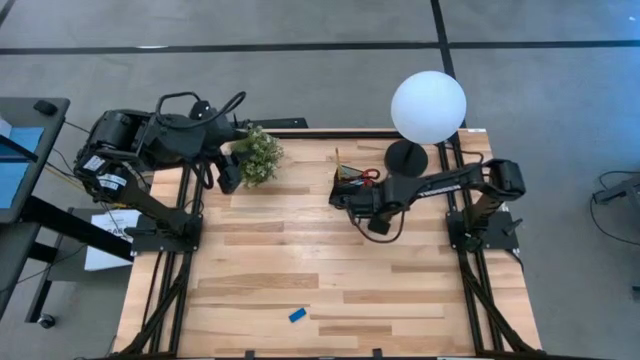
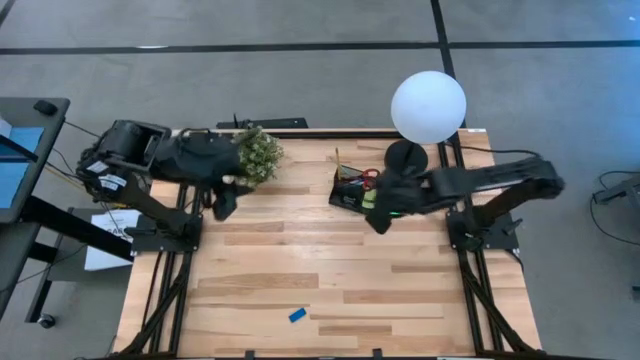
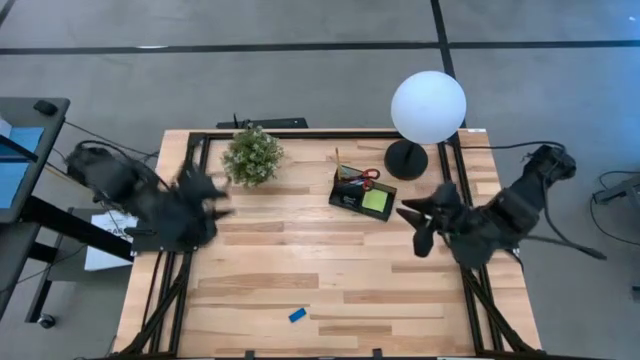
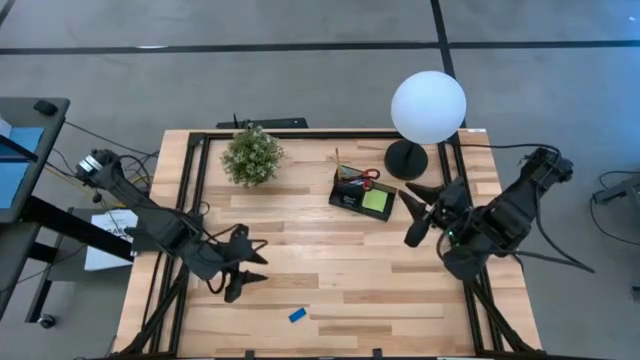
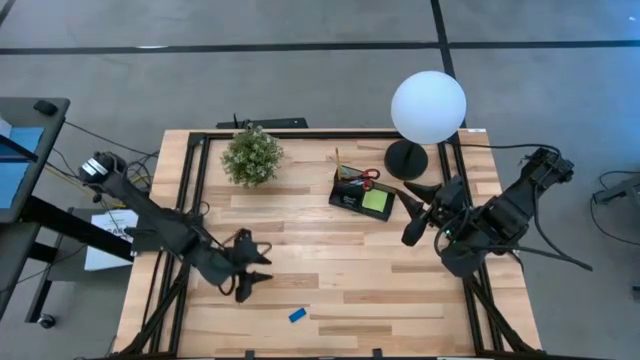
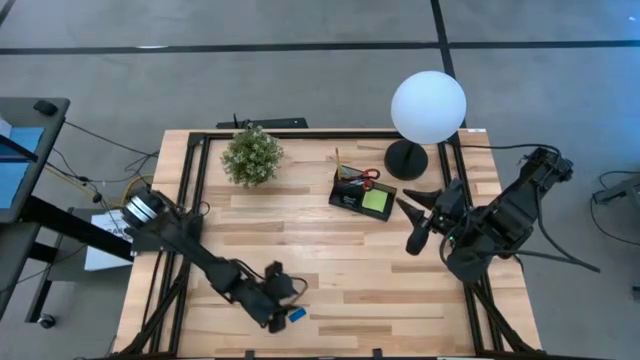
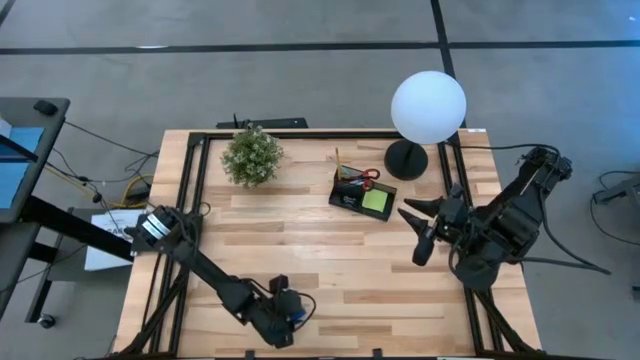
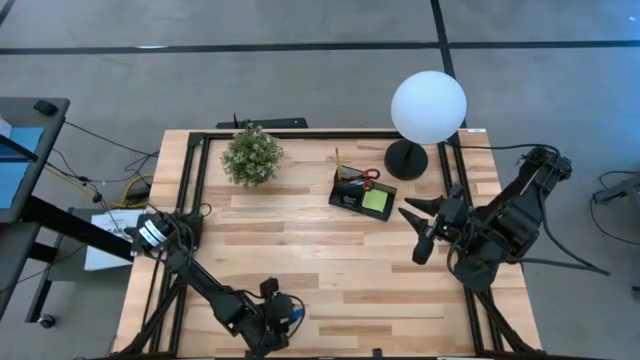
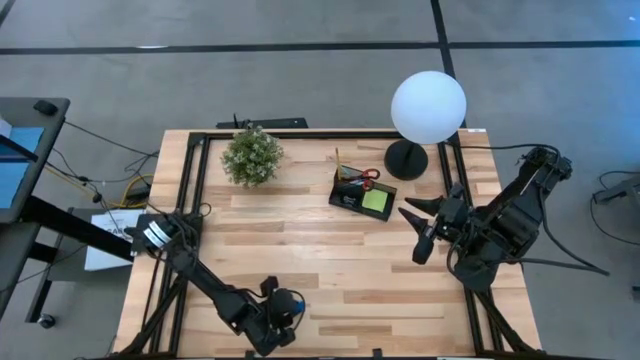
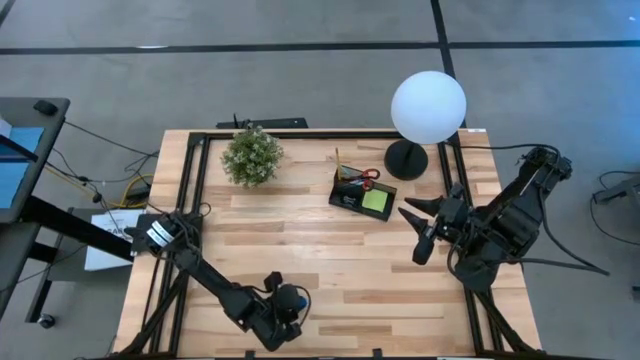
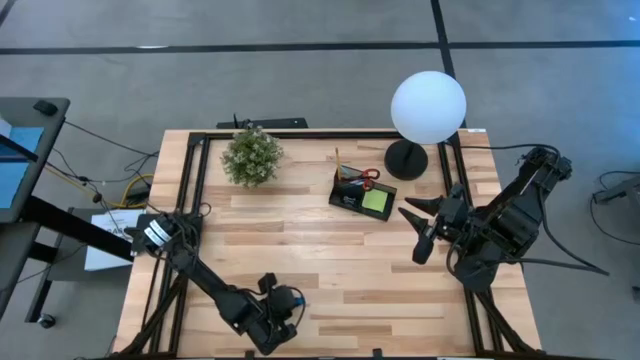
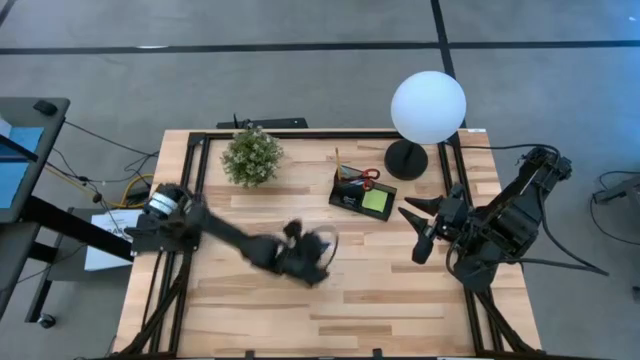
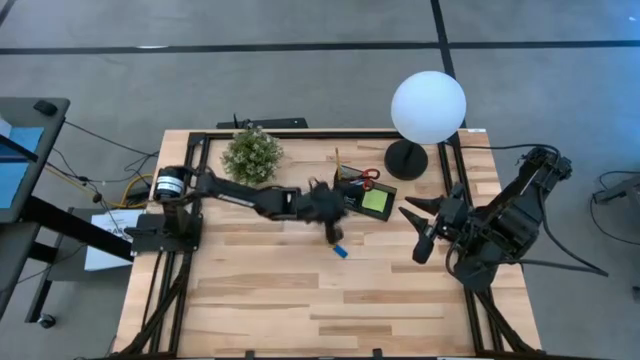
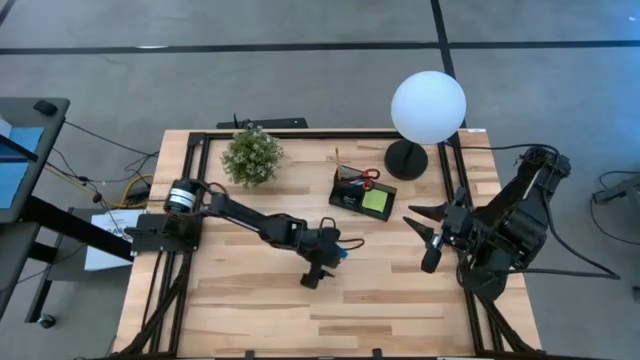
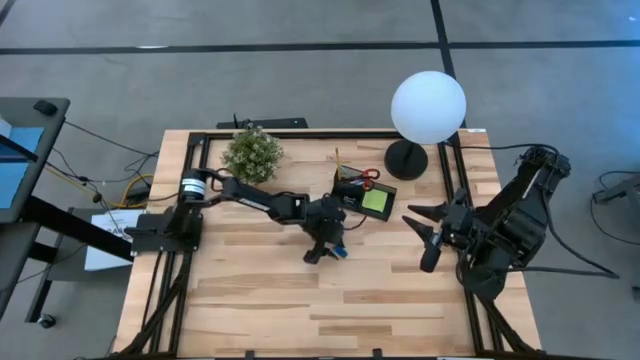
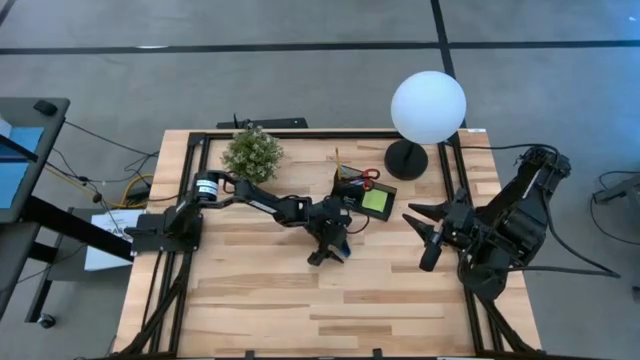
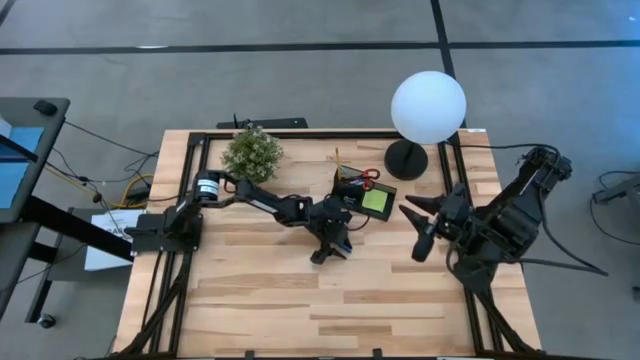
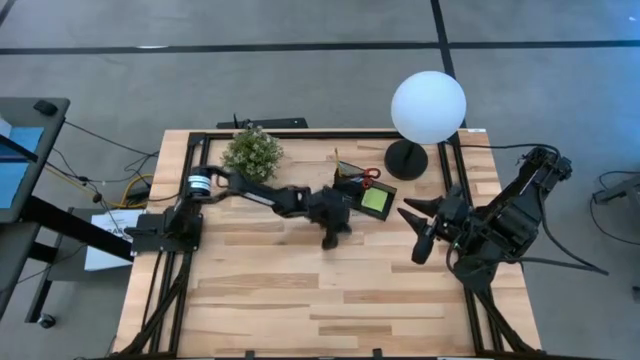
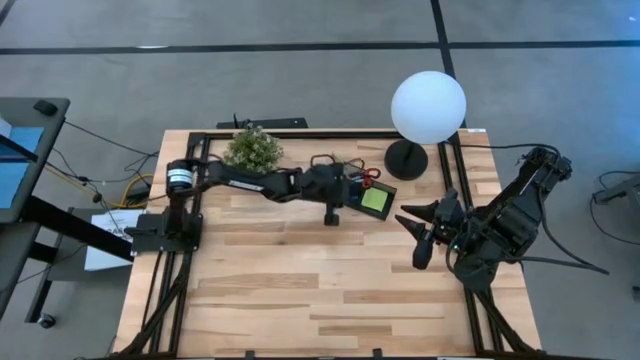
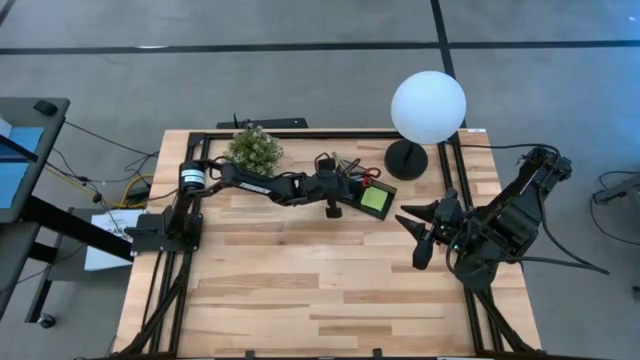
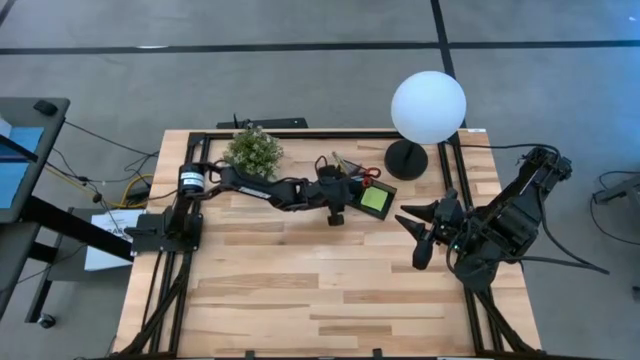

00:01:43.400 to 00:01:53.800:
Task: Pick and place office supplies into organizer
Put the blue eraser into the black desk organizer

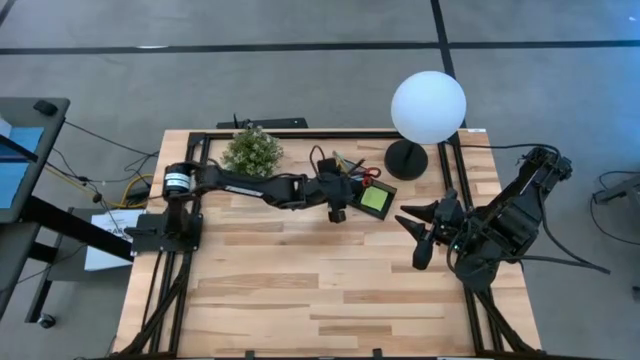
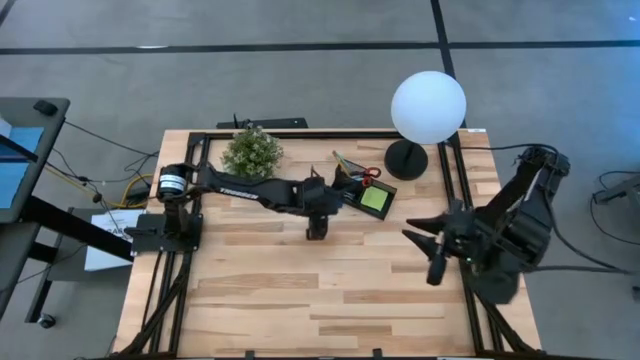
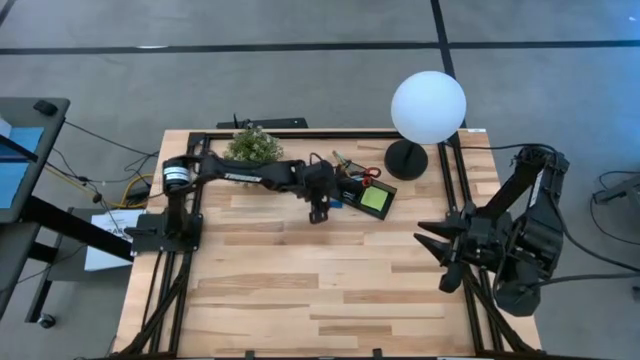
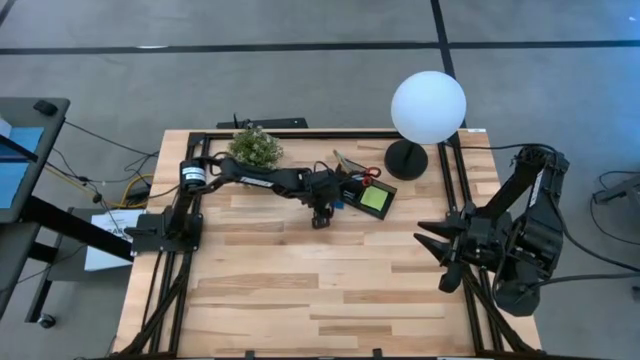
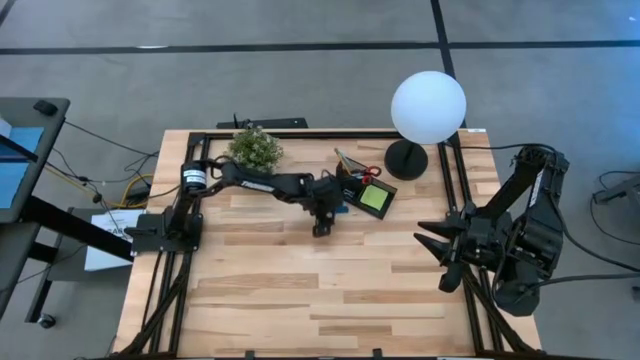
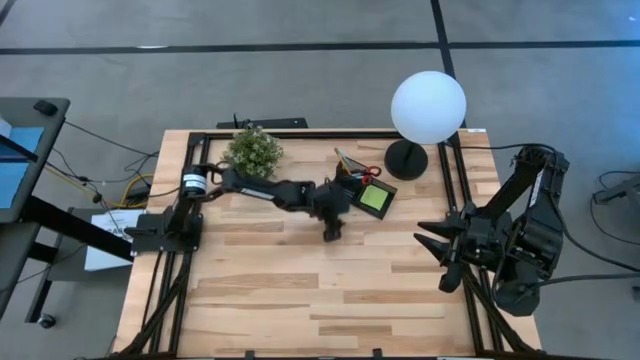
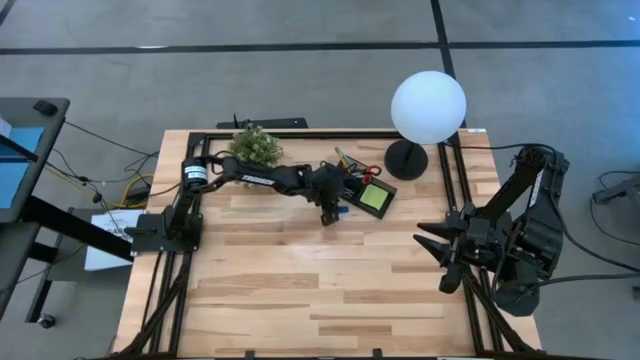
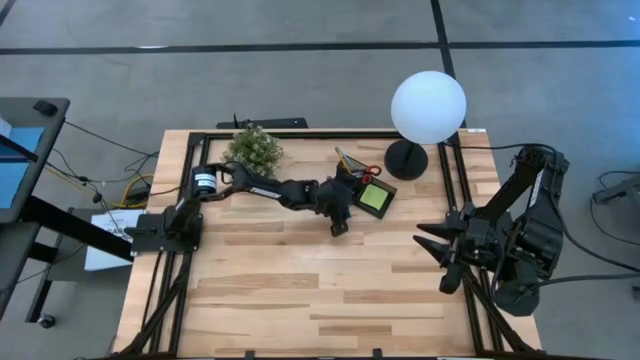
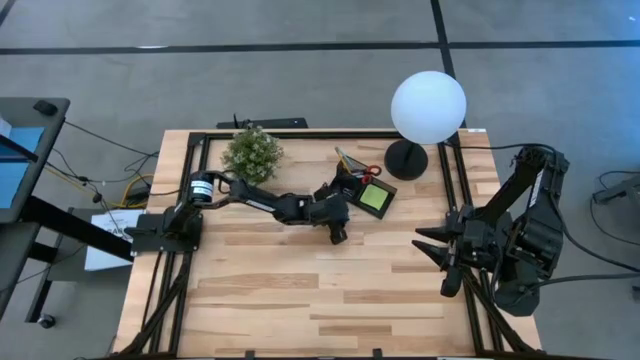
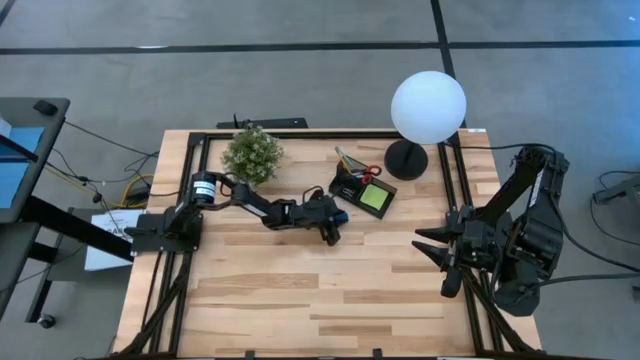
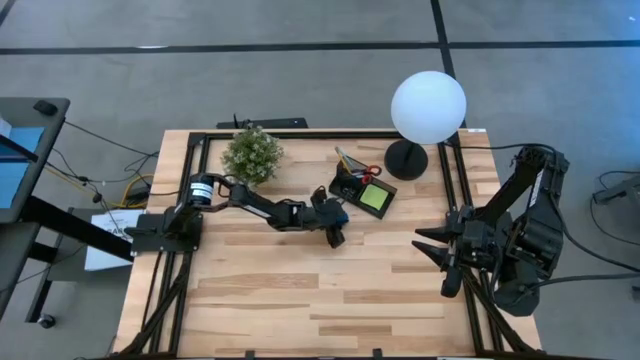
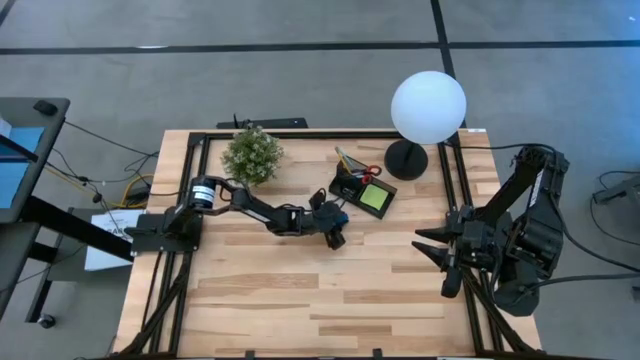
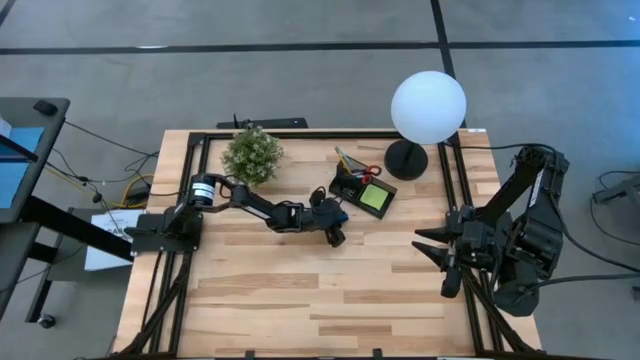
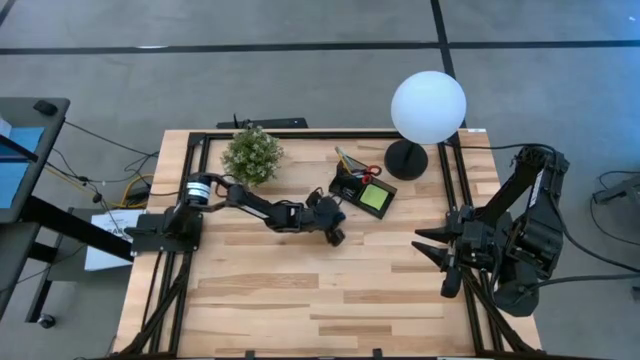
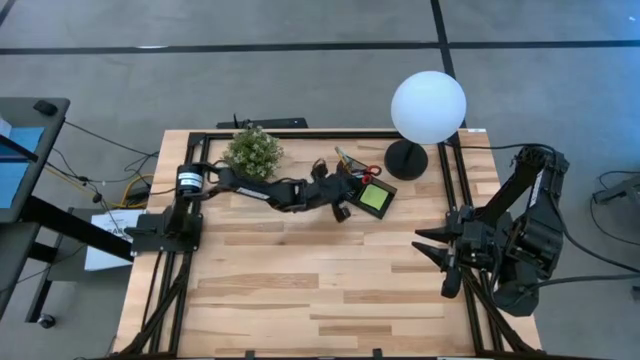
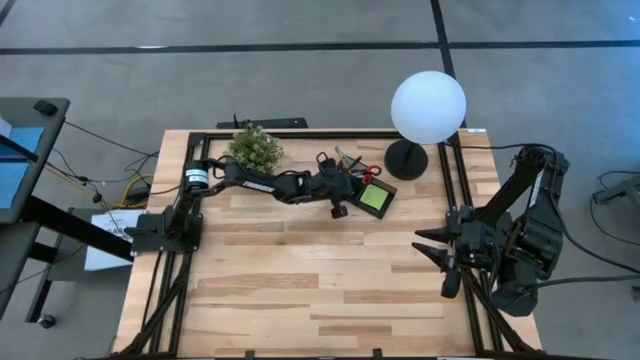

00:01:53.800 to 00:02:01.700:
Put the blue eraser into the black desk organizer

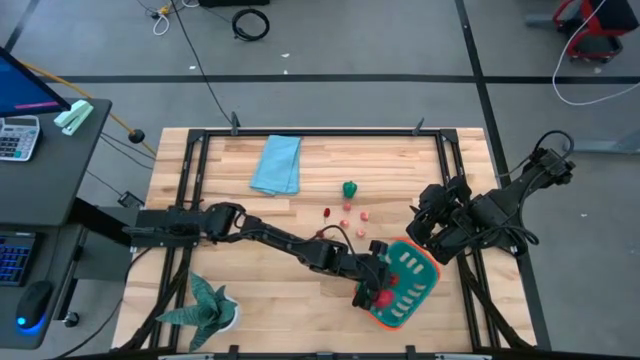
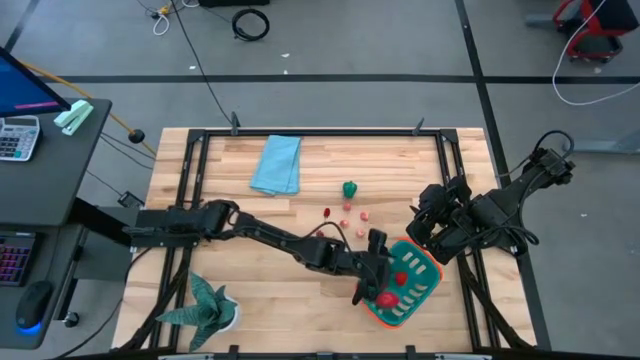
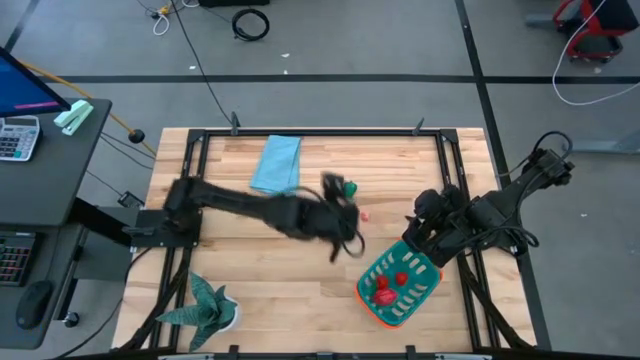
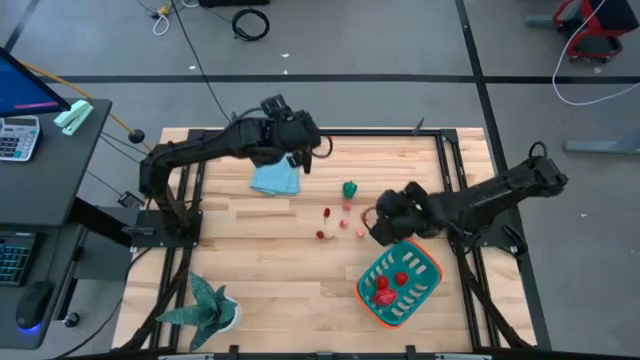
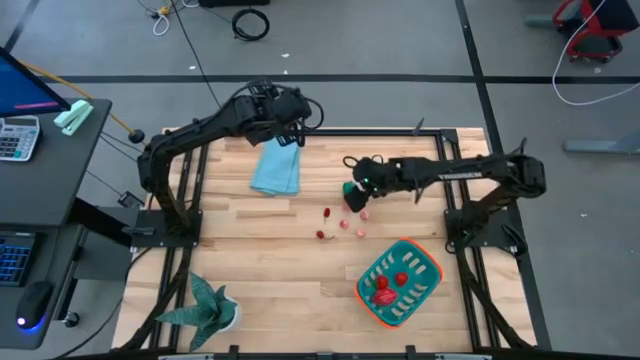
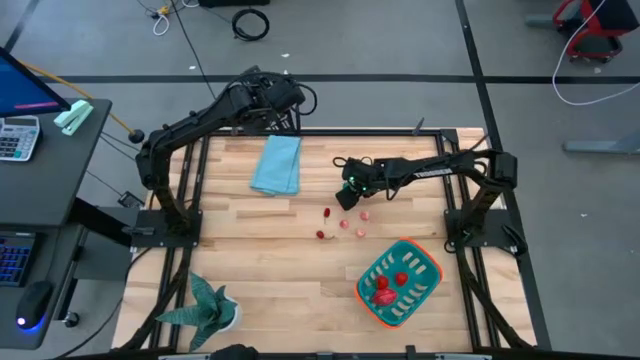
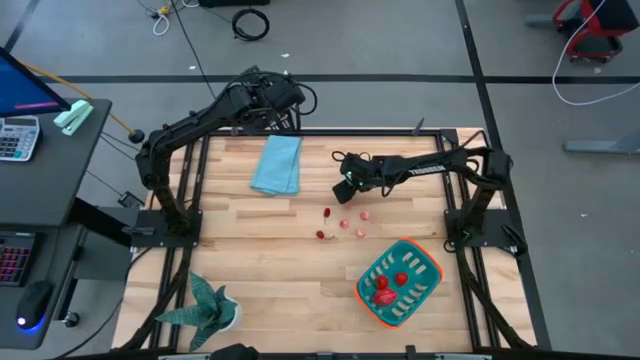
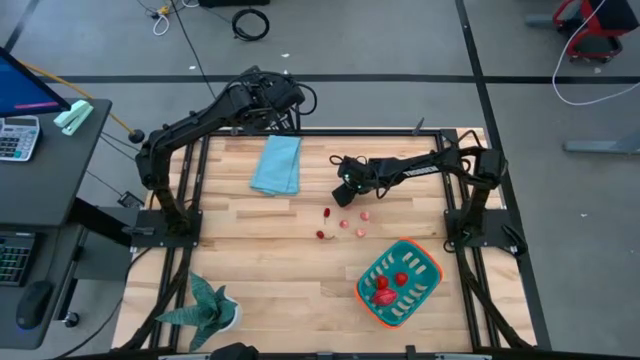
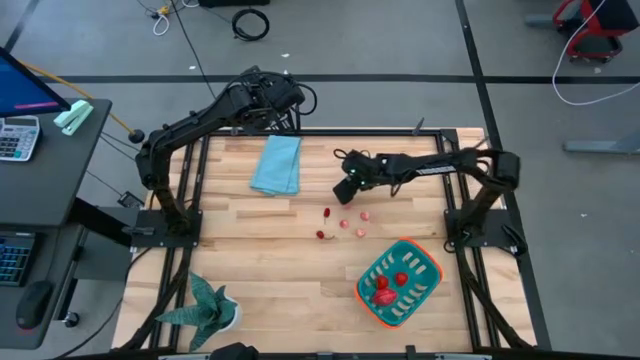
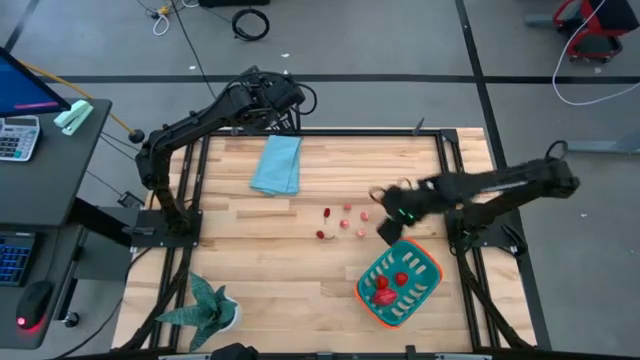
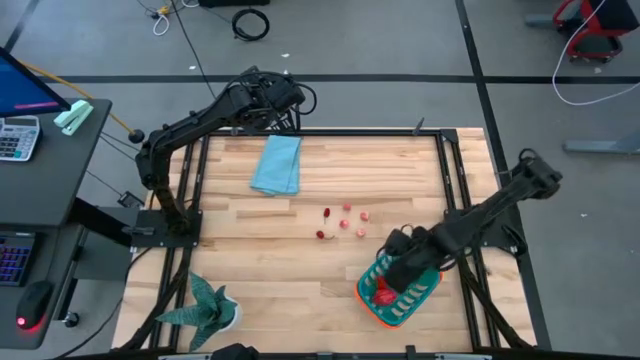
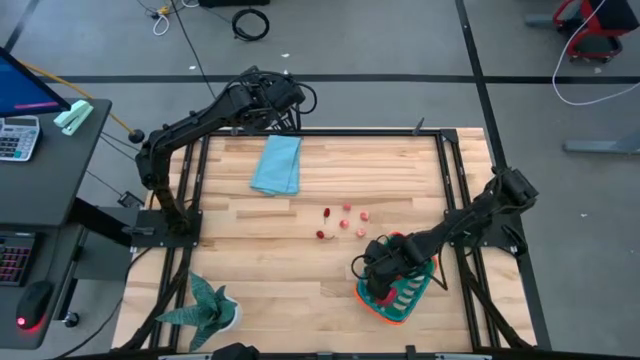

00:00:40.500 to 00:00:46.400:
Task: Pick and placing Produce into tupperware
Put the green bell pepper into the blue basket
